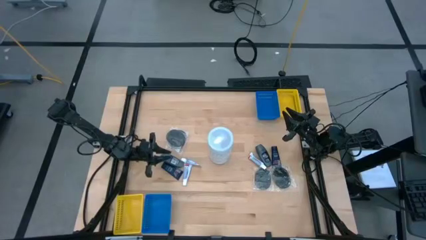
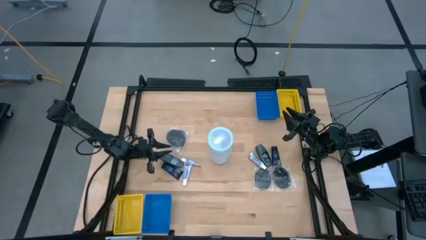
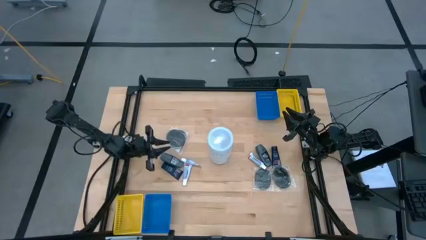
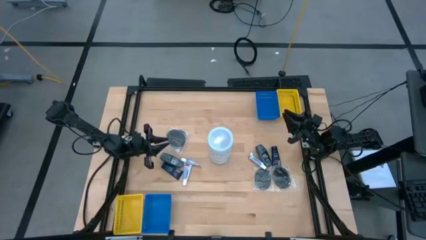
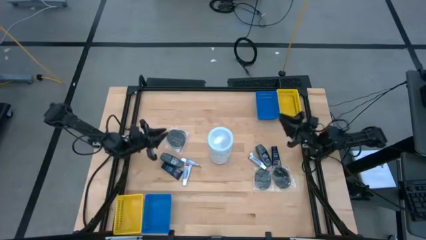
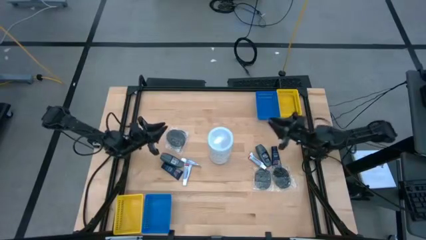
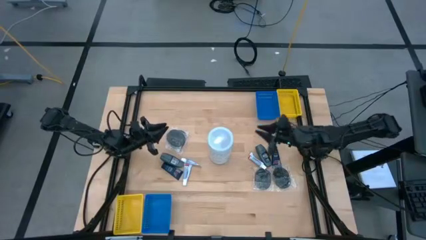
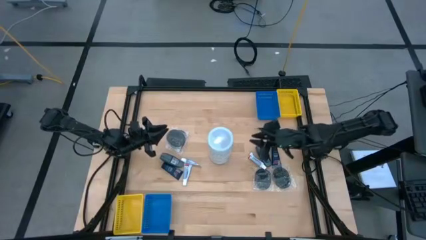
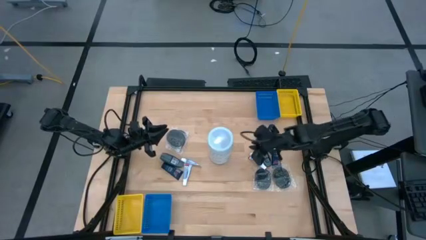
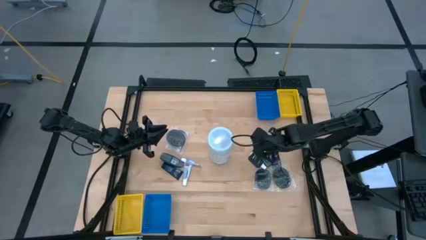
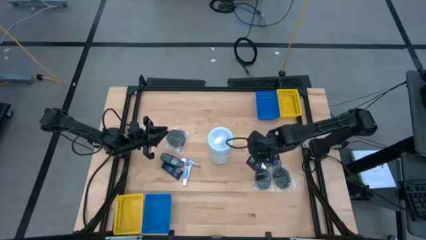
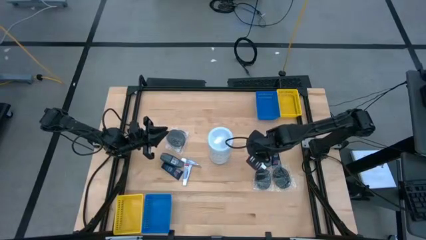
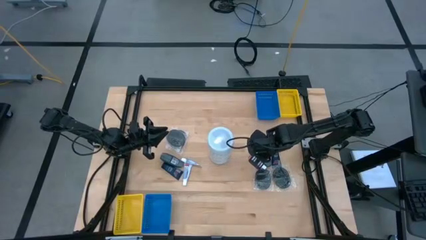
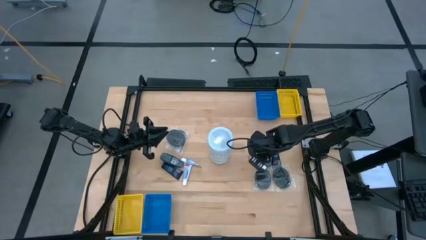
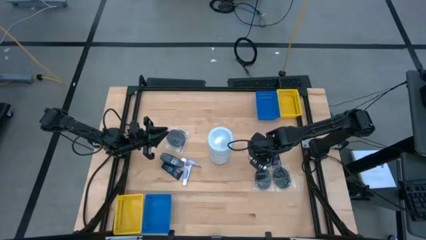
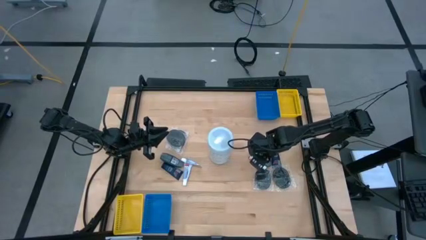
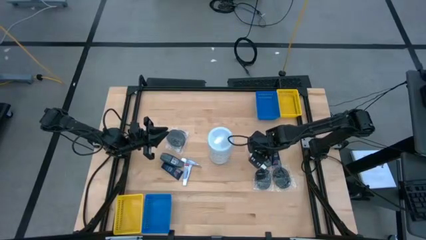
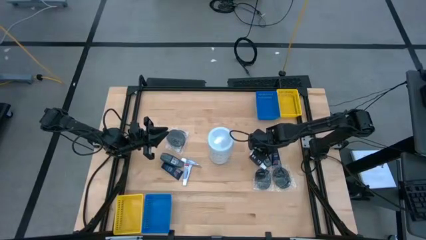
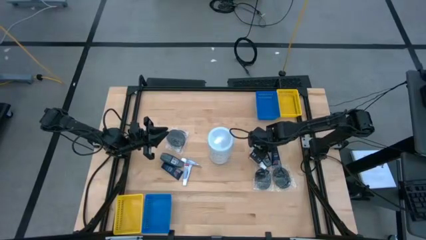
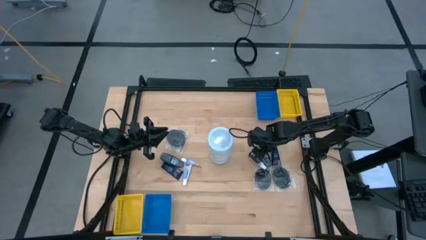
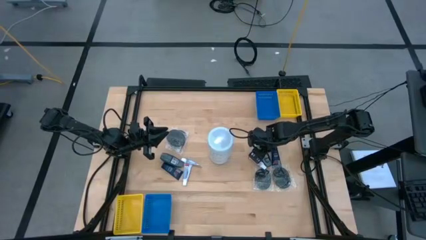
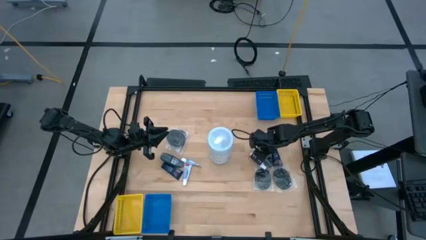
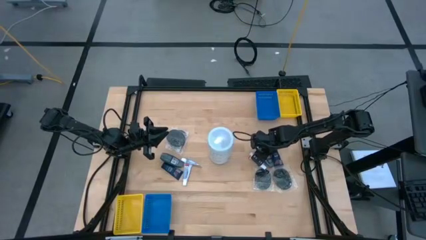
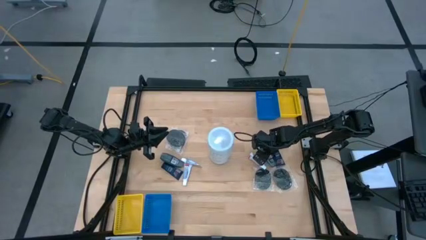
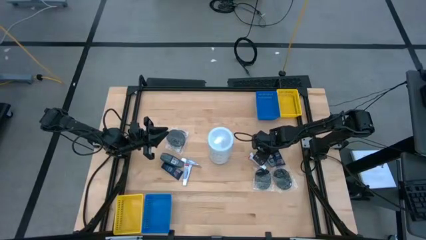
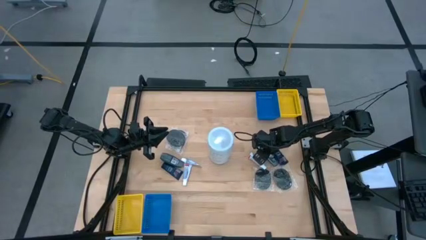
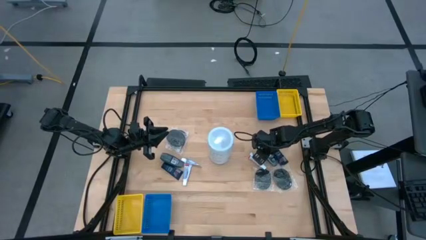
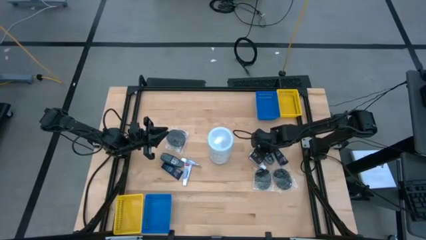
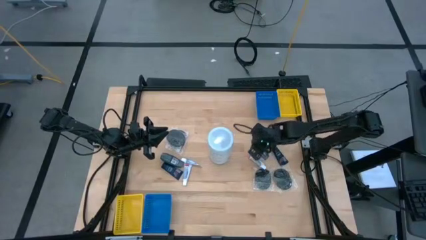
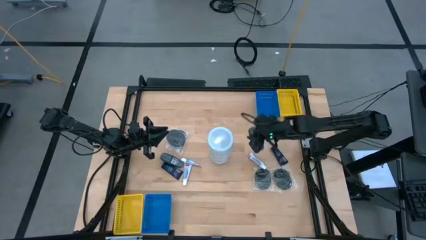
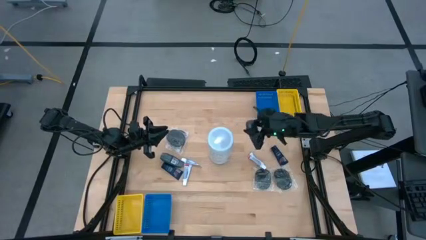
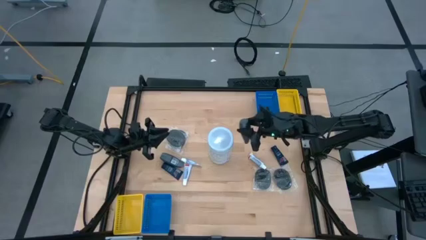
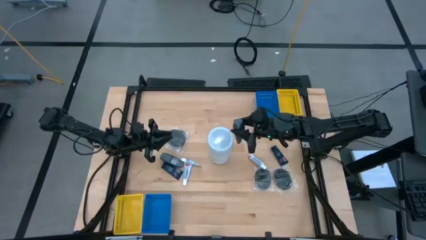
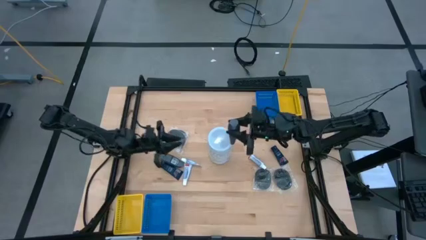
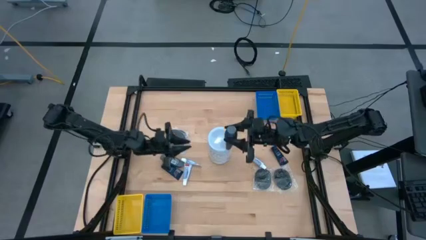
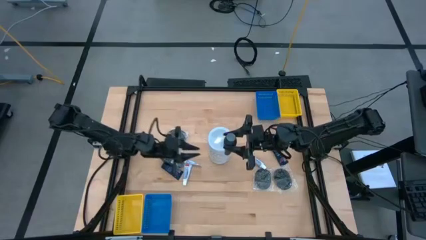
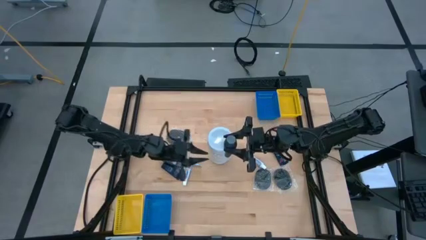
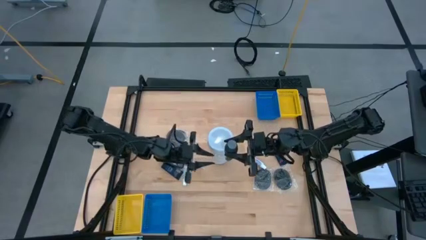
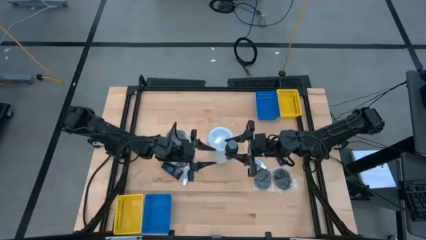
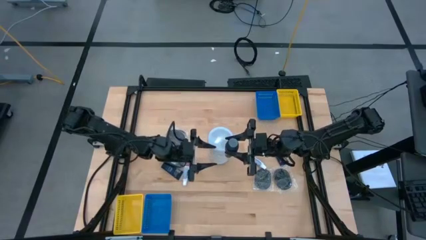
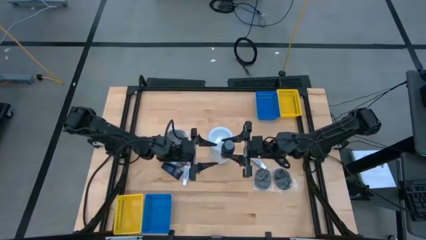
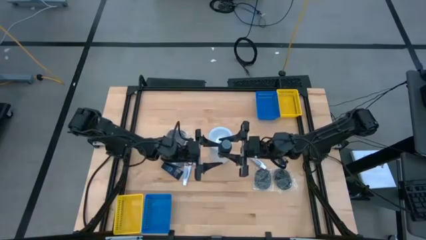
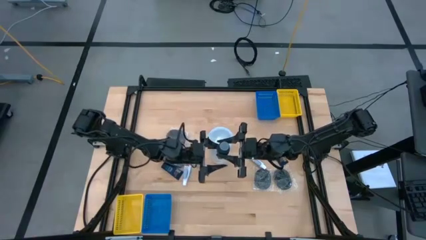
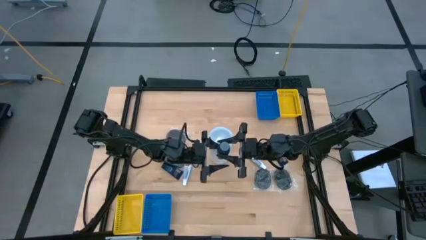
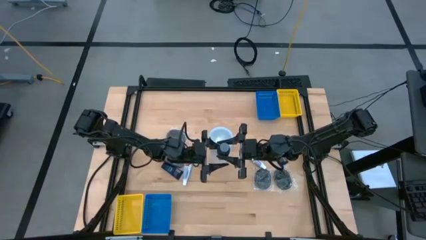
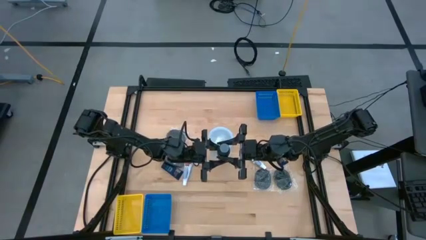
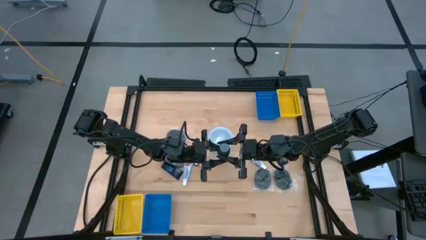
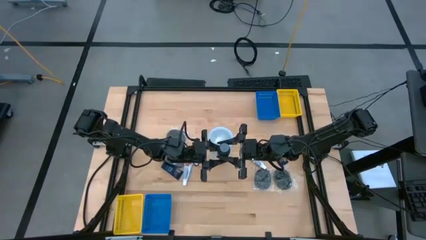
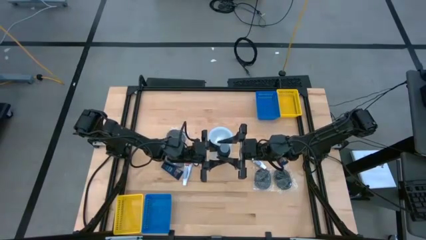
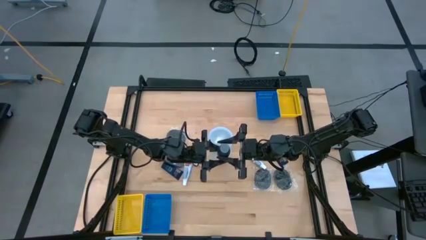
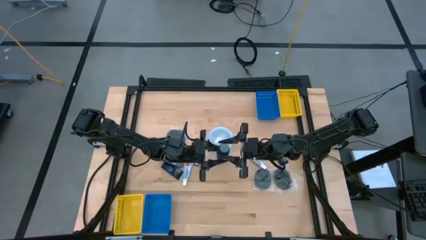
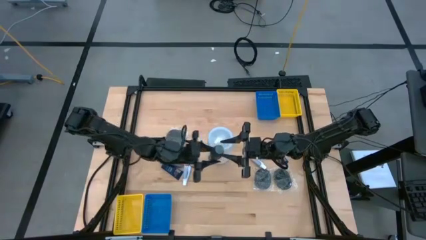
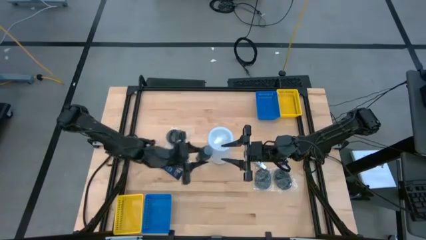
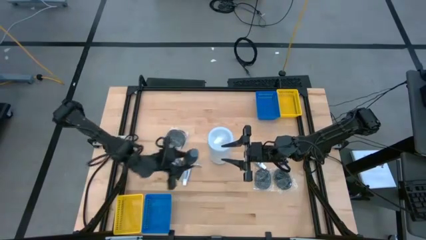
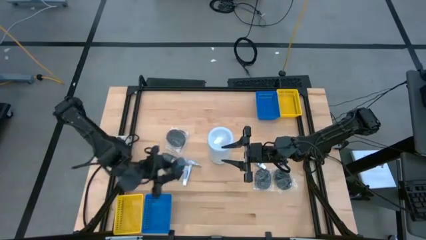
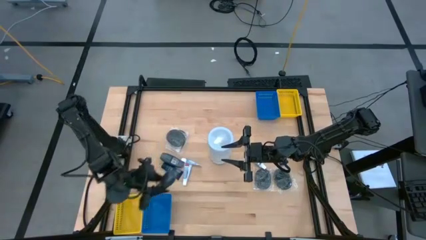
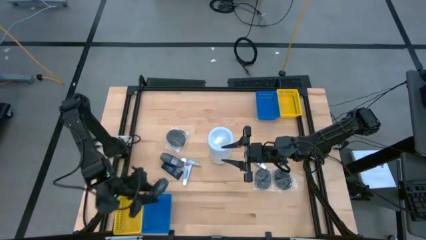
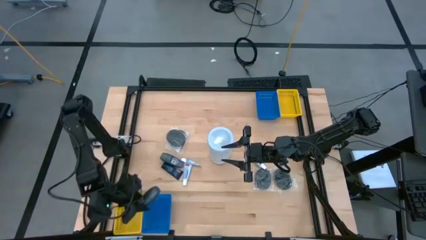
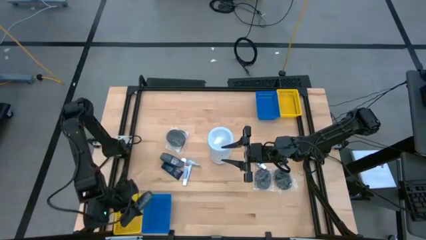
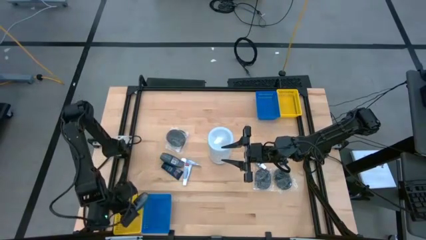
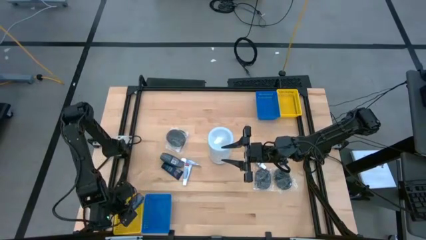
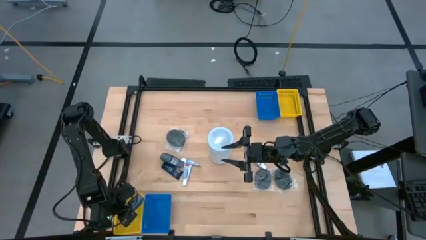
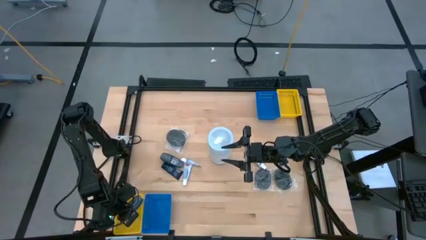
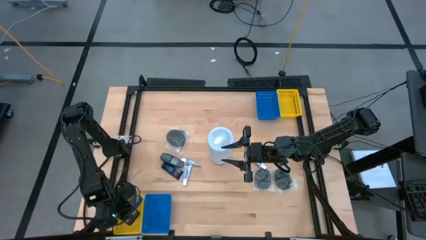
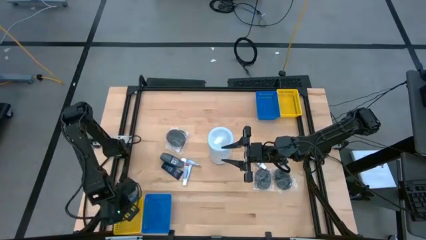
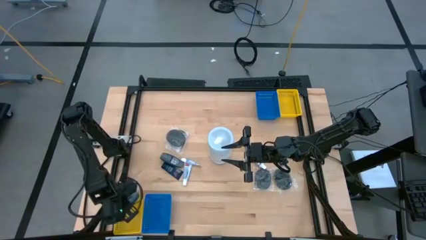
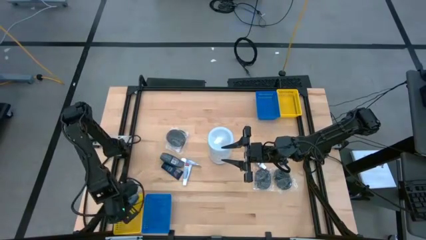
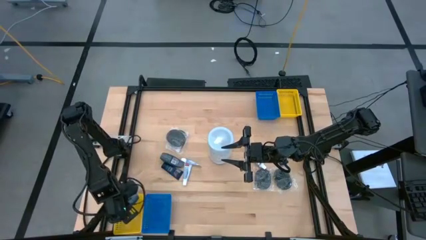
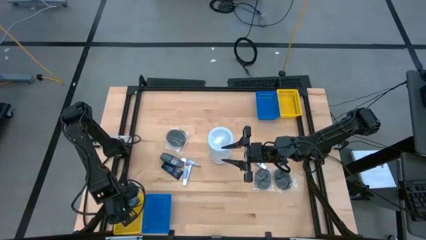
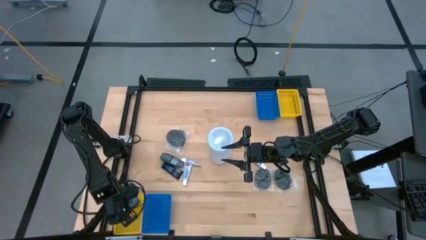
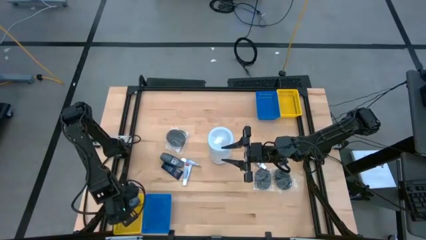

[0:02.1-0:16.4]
Task: Pick & Place Travel size toiletries
Put the right black roll-on bottle into the bottom yellow bin
